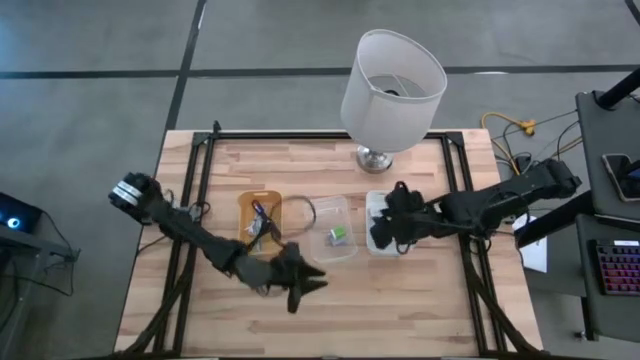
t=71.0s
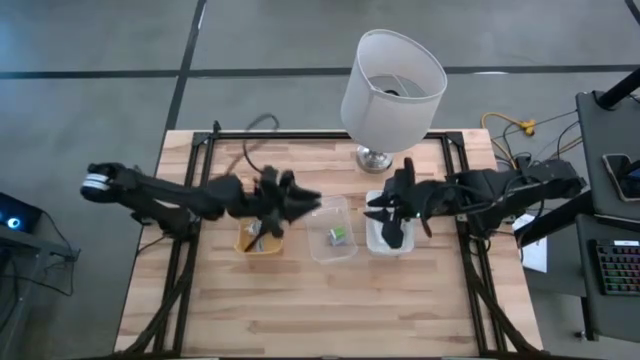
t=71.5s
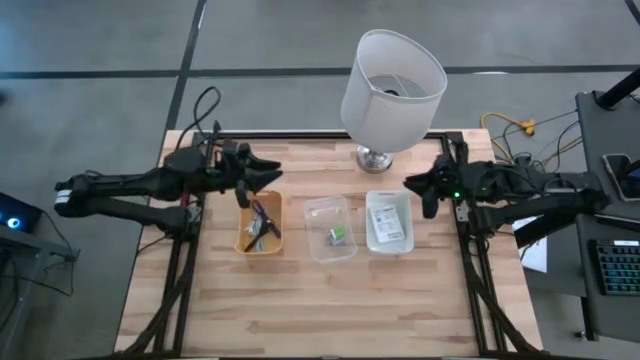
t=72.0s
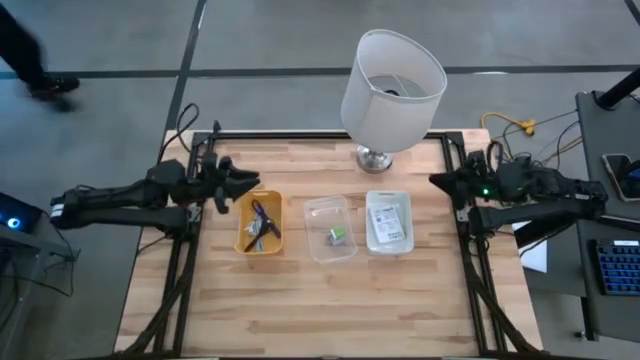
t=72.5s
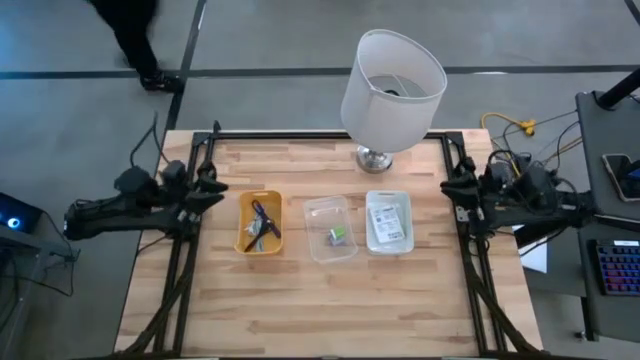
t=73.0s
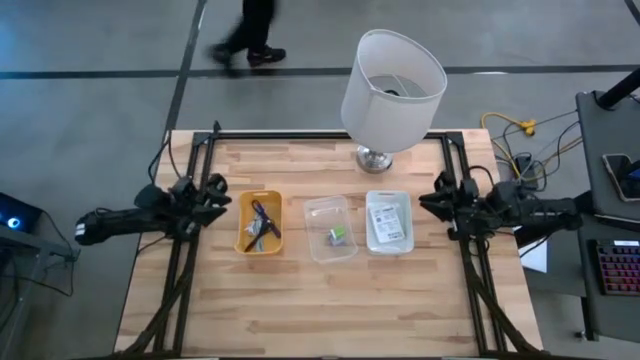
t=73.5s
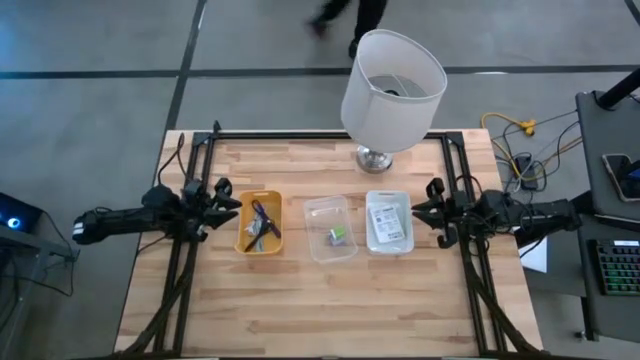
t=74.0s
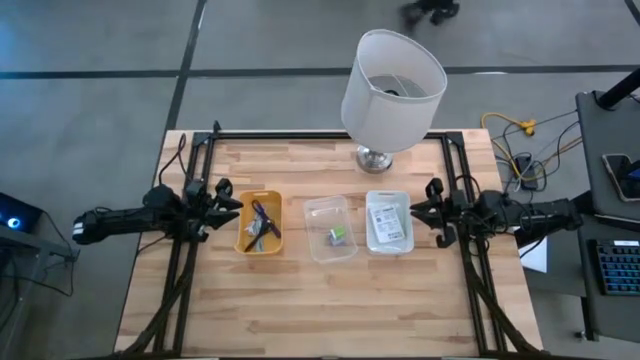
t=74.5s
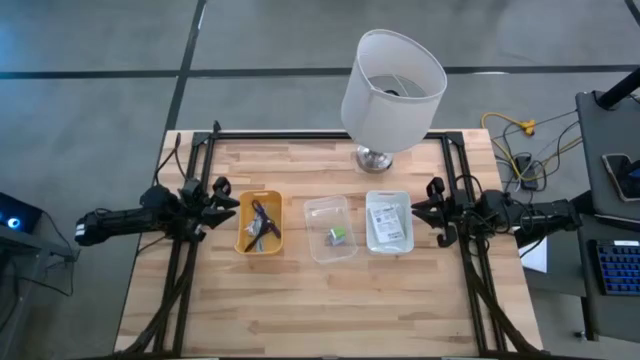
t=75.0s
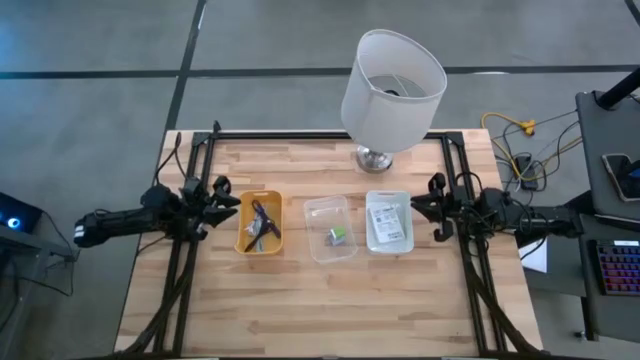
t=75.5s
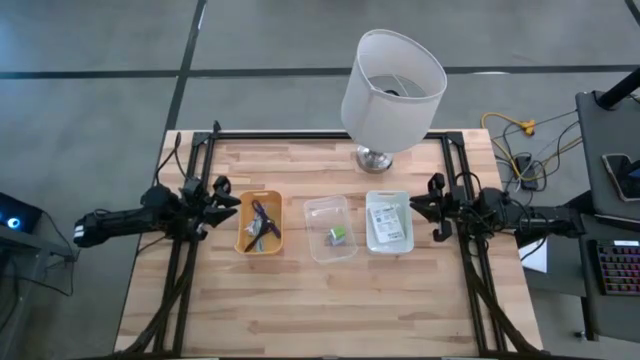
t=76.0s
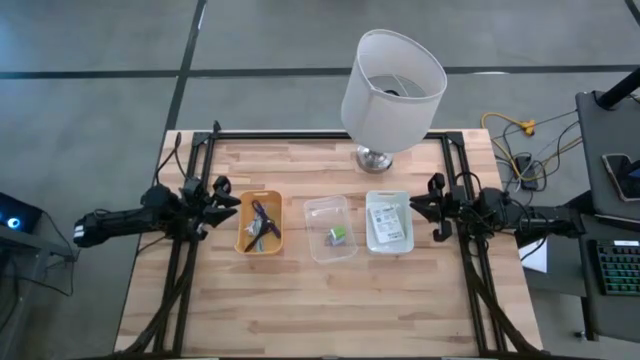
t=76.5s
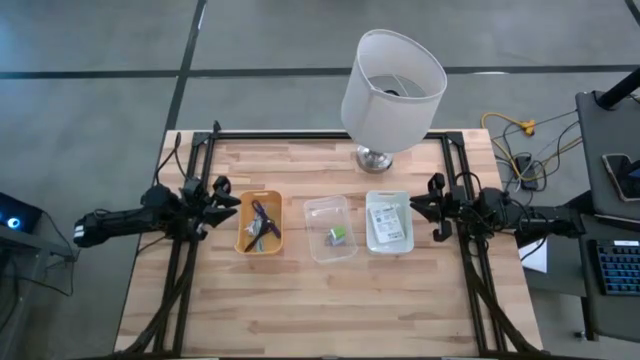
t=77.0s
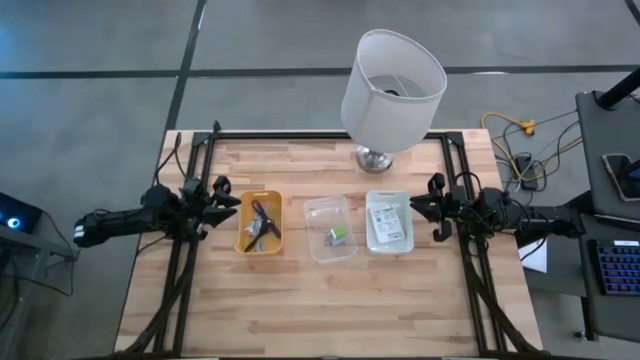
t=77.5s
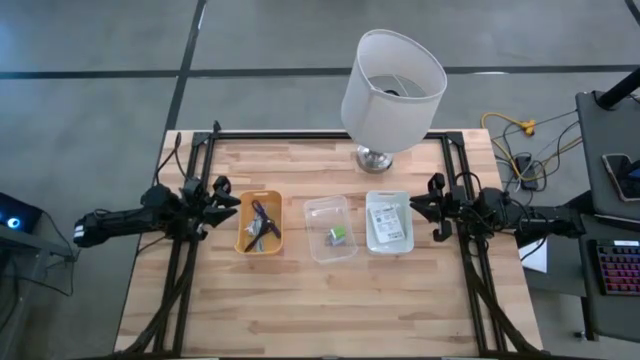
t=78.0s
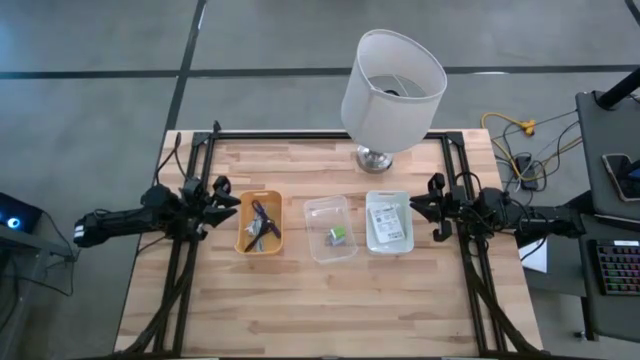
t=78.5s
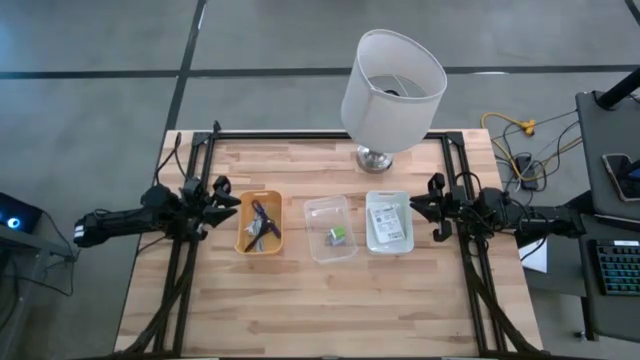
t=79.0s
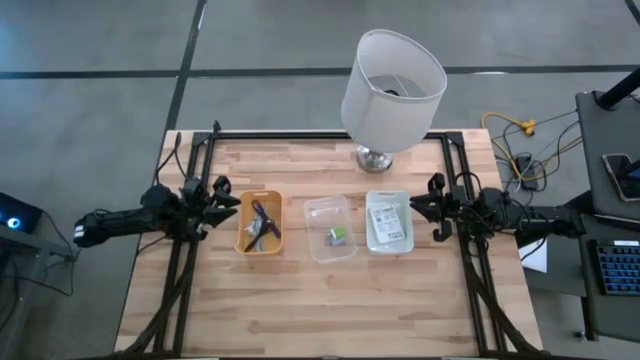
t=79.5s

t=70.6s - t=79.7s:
Task: Pick and place items into bin
Return to Home Position

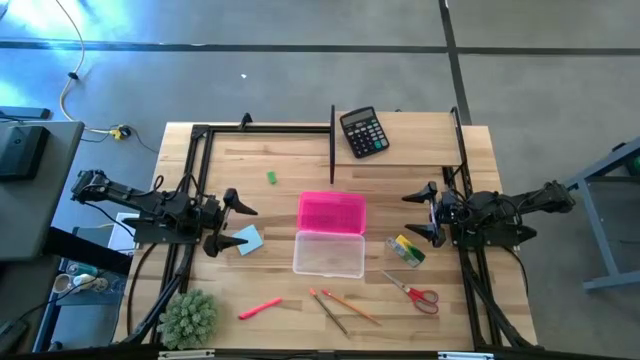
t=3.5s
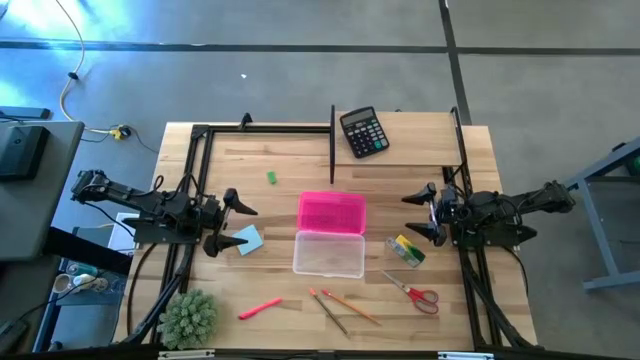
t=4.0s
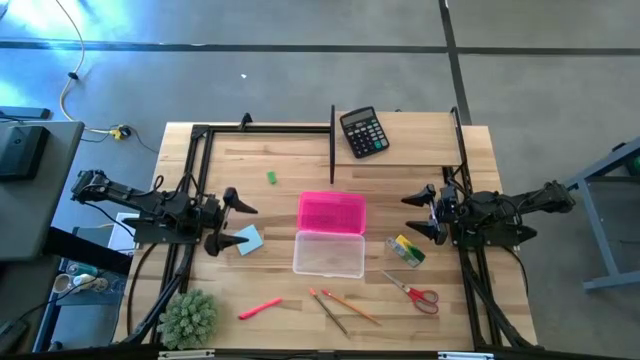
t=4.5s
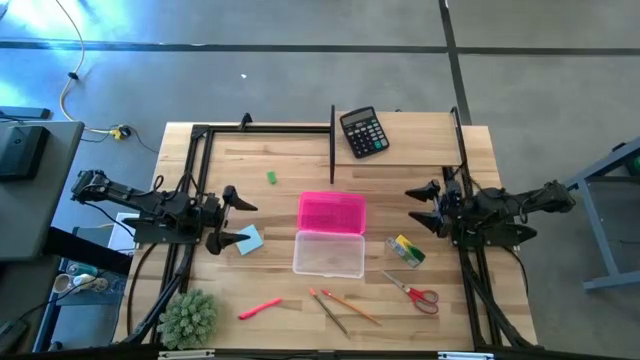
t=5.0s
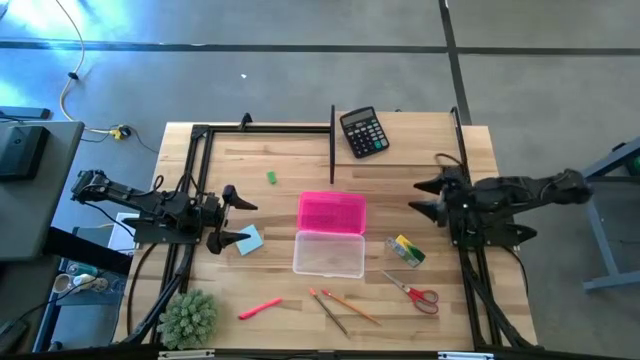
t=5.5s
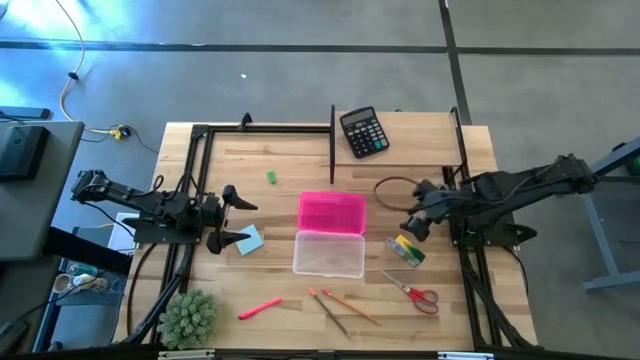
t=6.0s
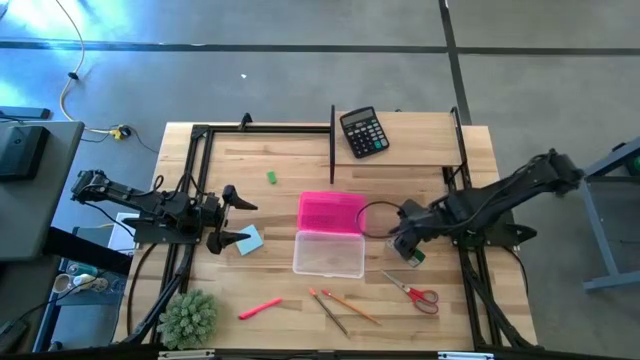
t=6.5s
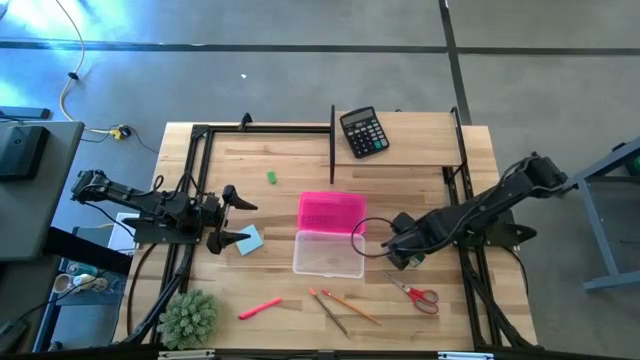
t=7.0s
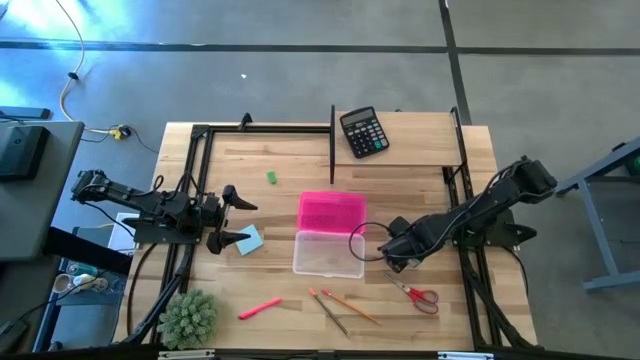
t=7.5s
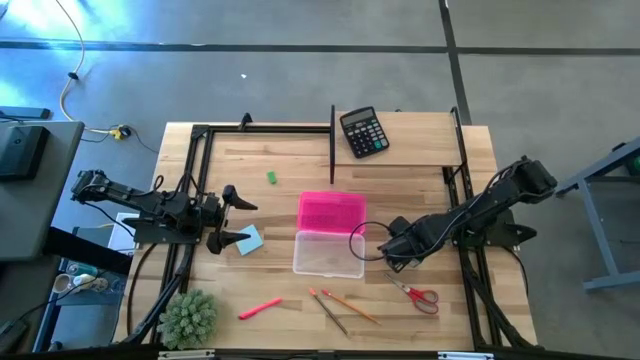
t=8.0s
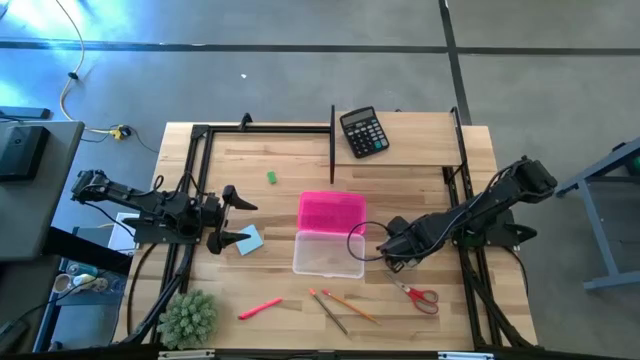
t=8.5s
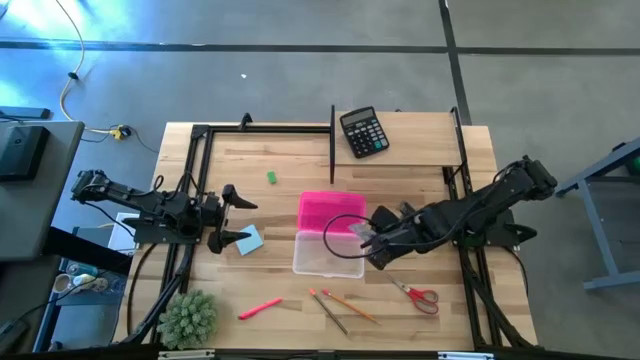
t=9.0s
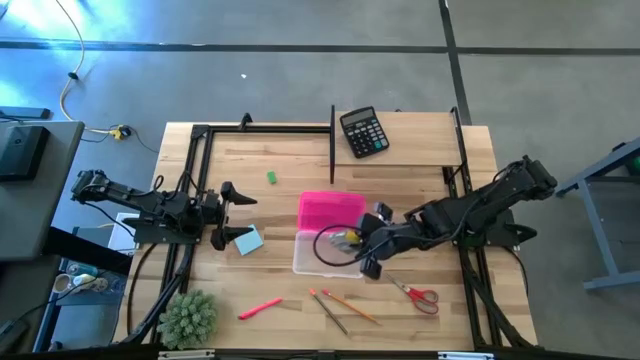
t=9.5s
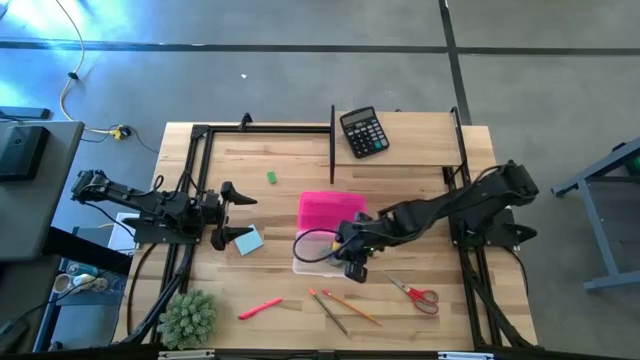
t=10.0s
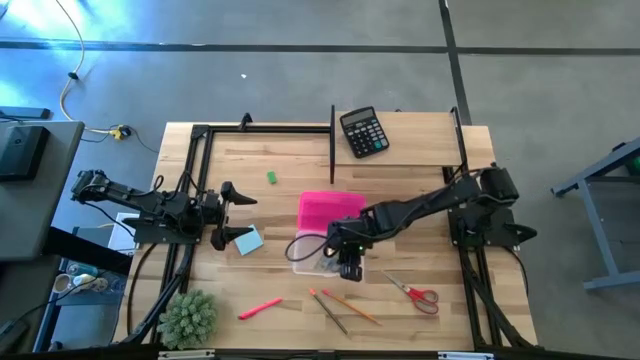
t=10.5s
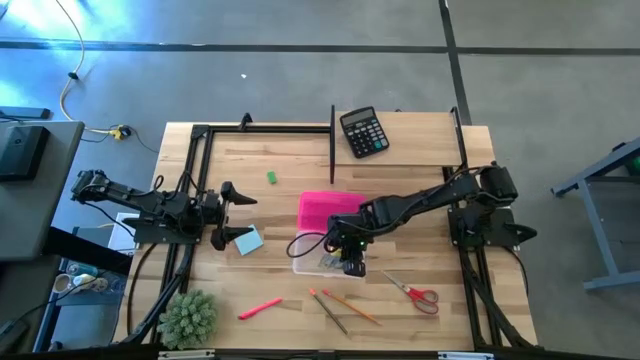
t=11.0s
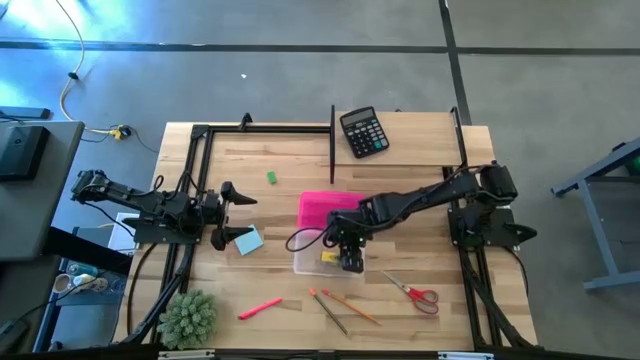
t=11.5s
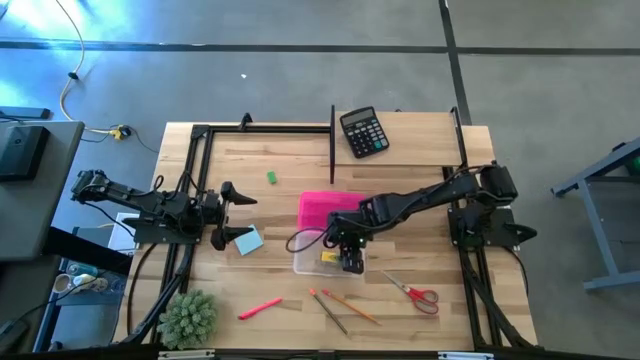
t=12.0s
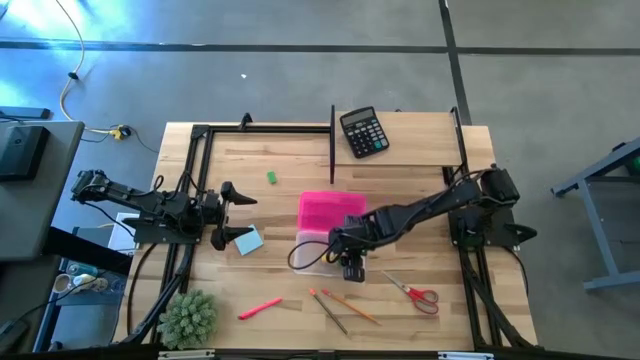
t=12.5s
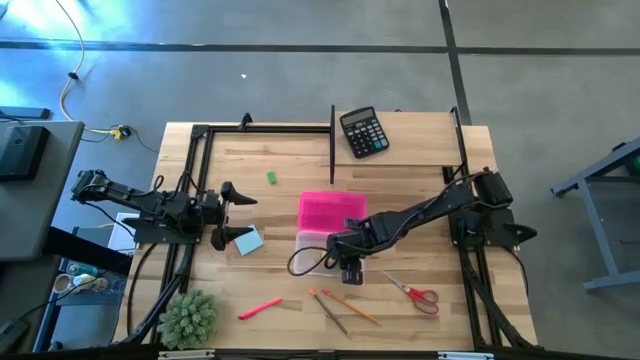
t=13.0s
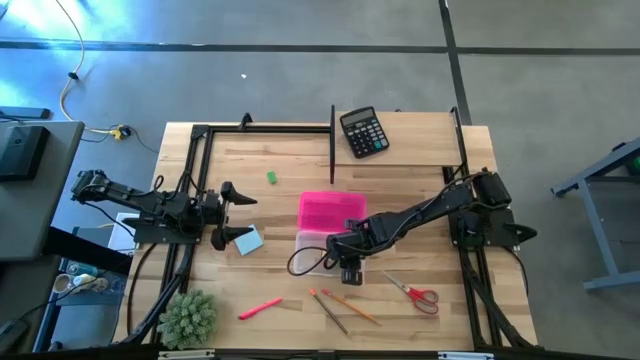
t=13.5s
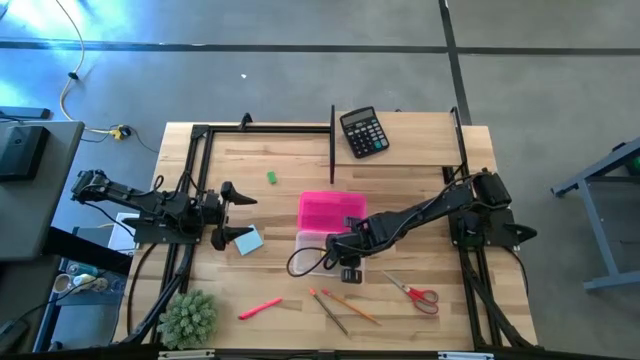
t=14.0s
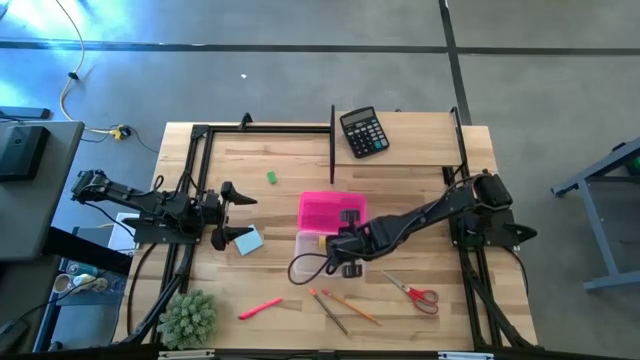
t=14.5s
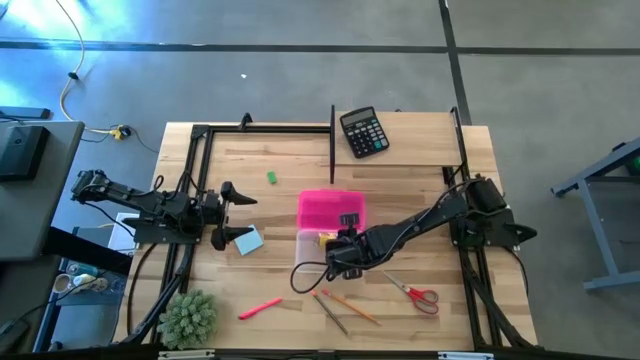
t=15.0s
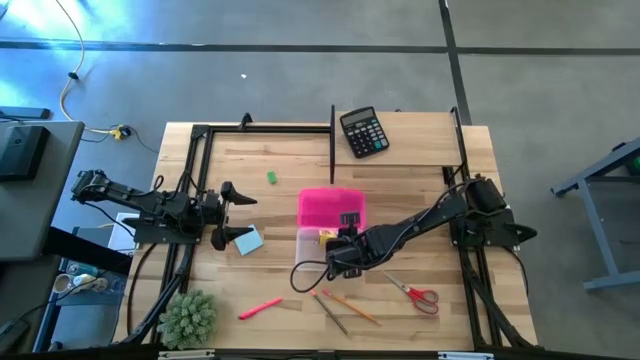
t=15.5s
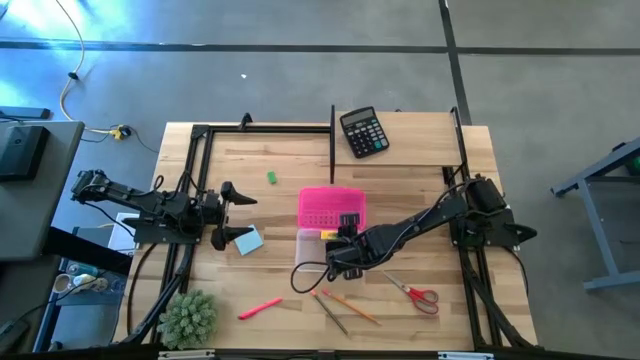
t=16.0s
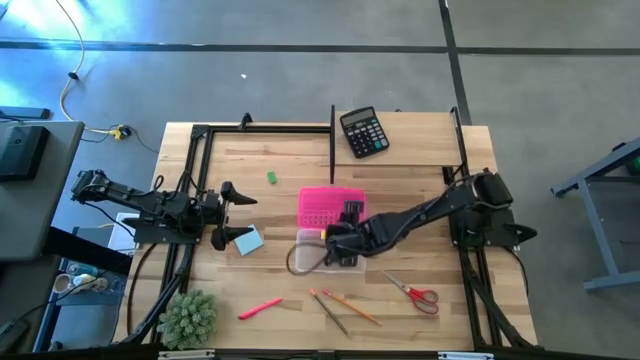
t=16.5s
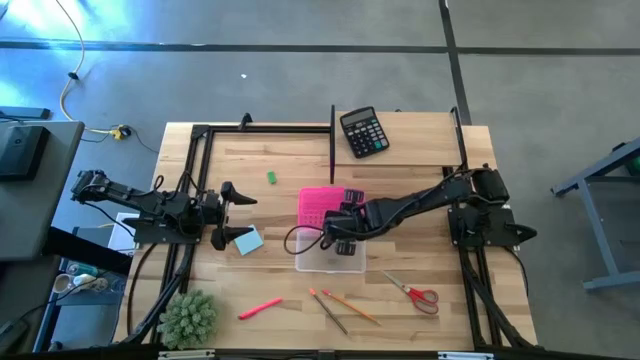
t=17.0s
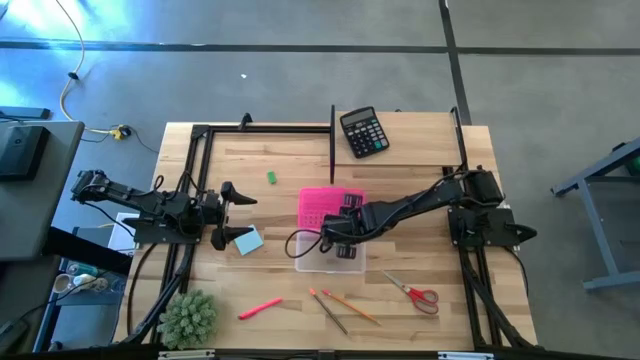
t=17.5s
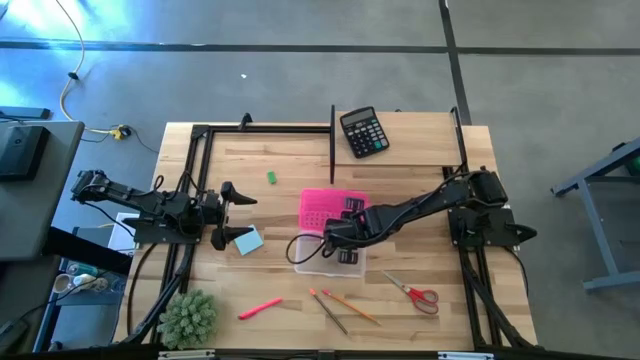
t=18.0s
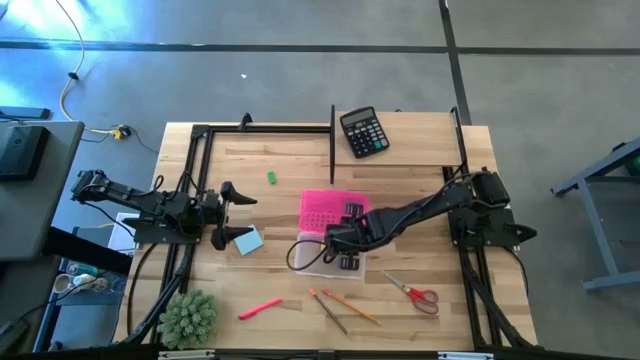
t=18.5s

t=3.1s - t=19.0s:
Task: Pack school essentials
Put the yellow crayon box into the pink supply box
